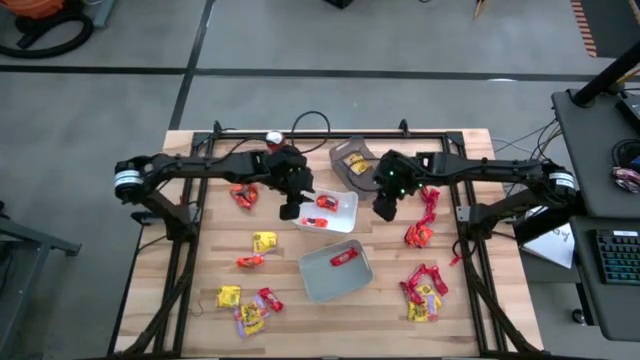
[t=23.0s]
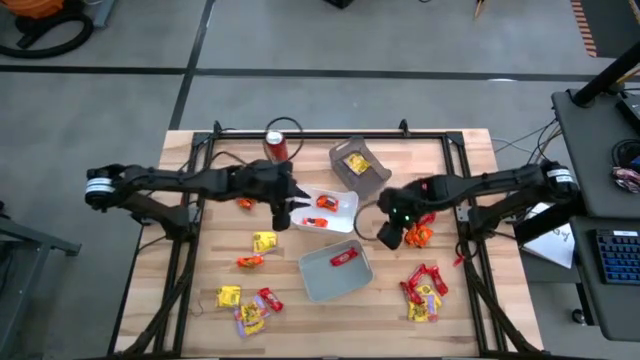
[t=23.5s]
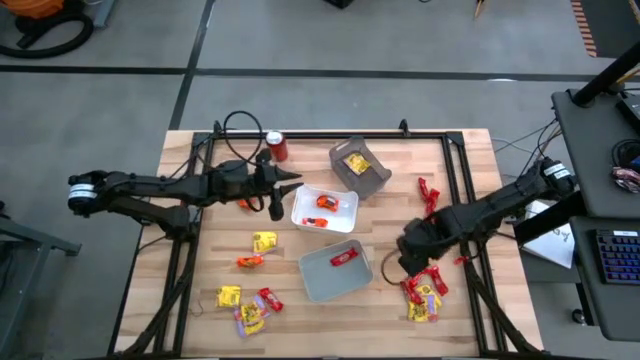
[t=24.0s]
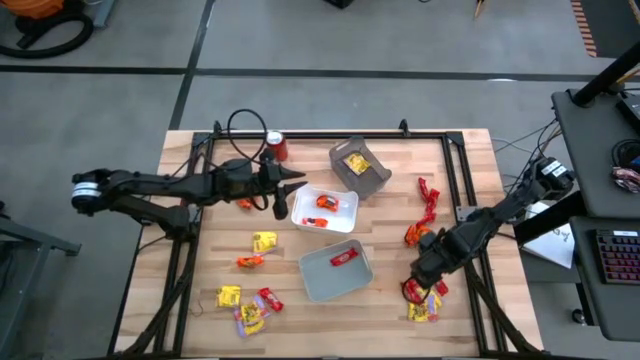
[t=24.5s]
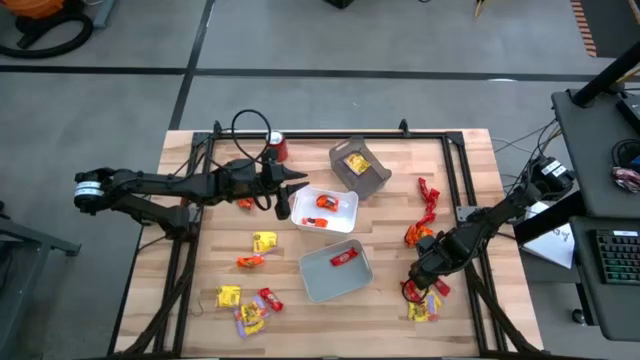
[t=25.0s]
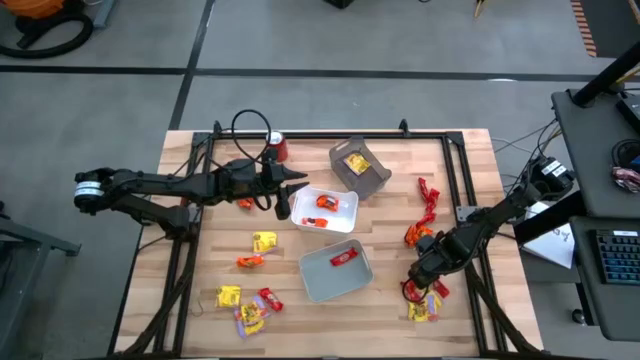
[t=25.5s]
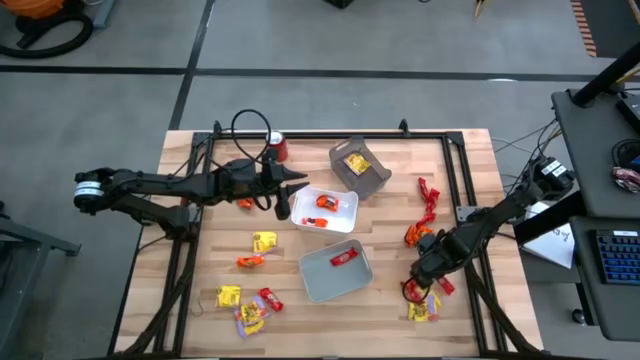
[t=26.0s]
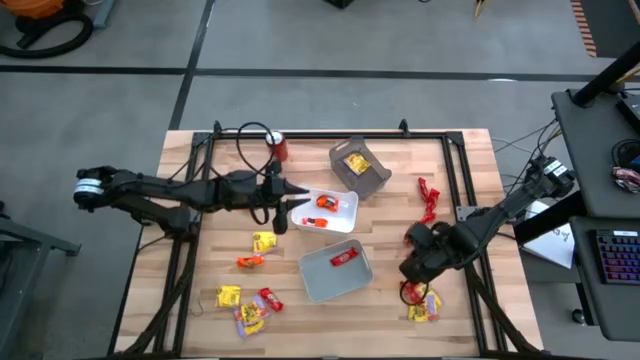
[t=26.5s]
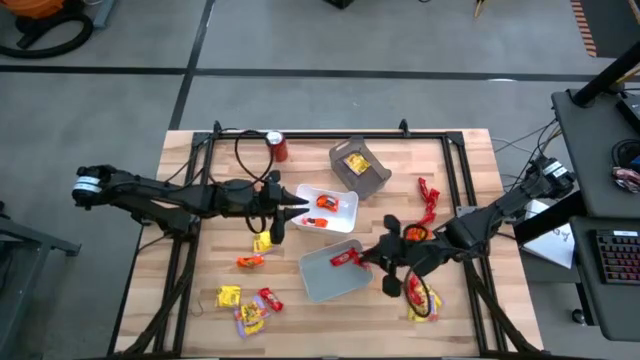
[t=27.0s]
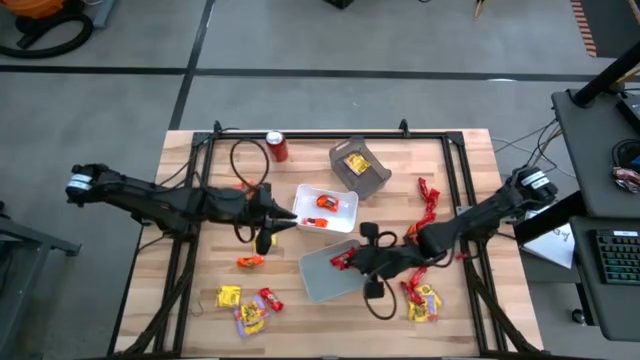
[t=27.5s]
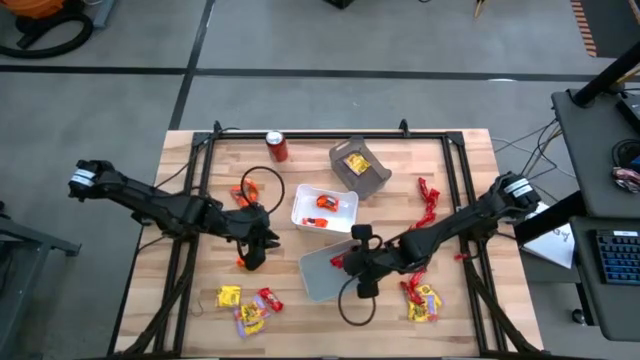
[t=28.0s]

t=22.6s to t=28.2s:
Task: Sort candy
Put the red chocolate pack into the gray bin

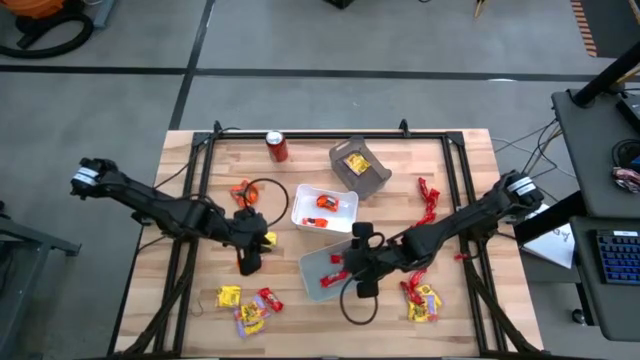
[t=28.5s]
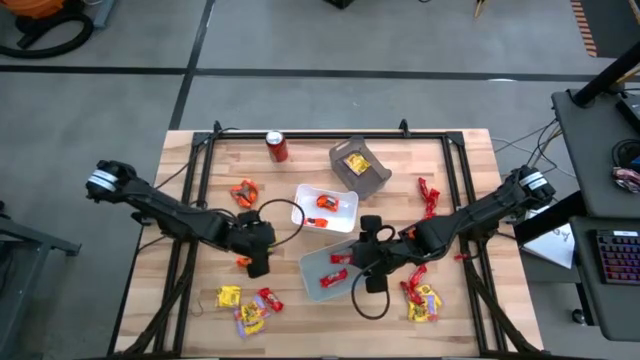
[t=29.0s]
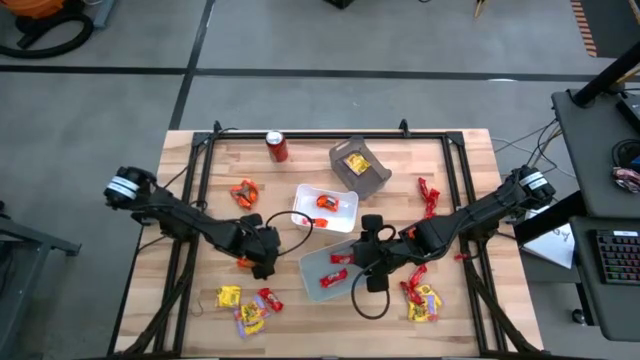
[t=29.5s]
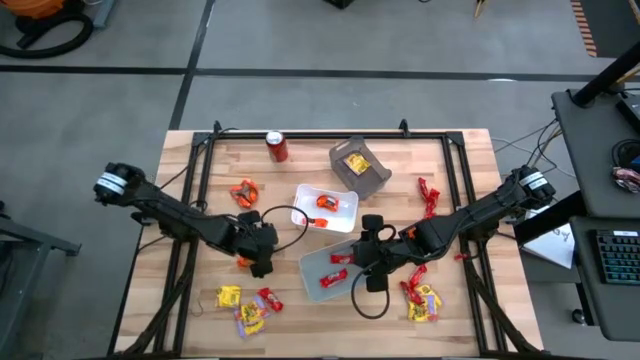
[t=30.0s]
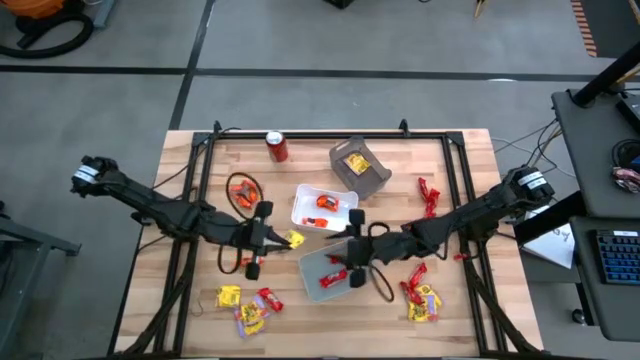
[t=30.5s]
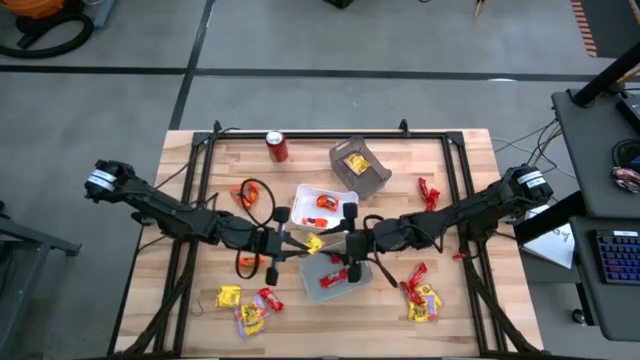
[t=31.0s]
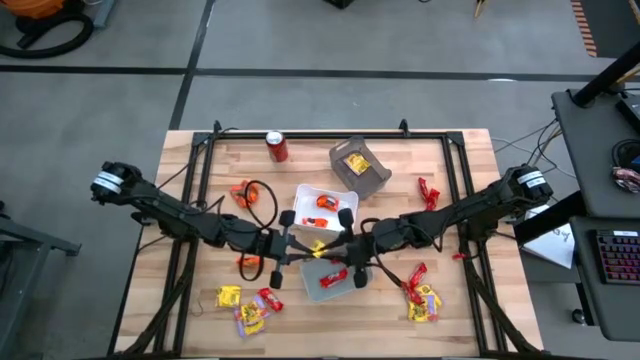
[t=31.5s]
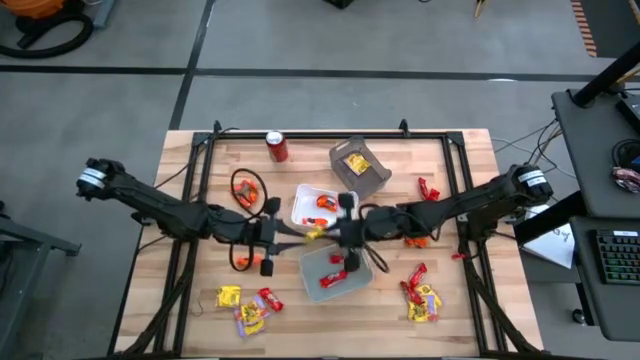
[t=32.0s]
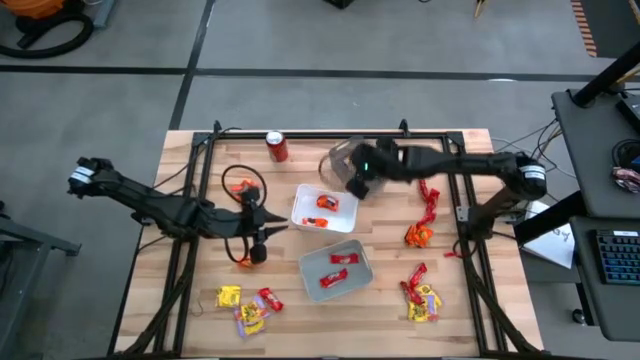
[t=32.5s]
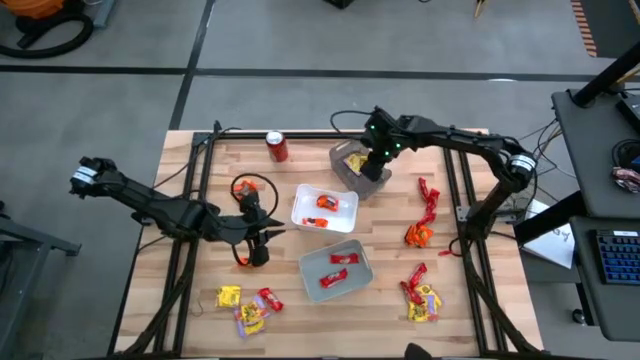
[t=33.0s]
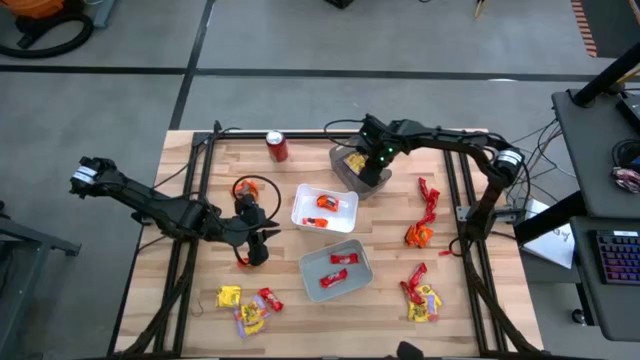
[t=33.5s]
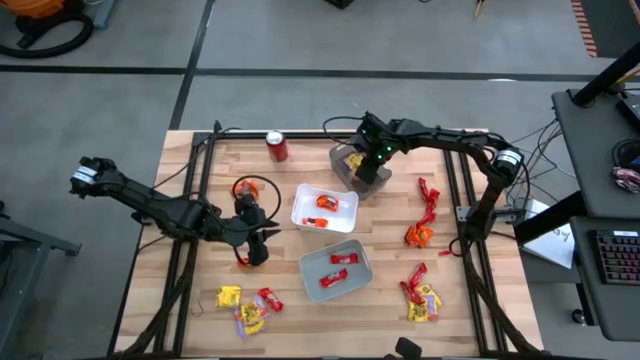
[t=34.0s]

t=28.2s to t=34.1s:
Put the yellow candy pack into the black bin

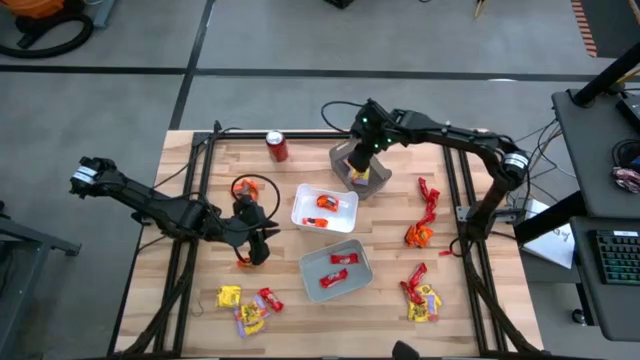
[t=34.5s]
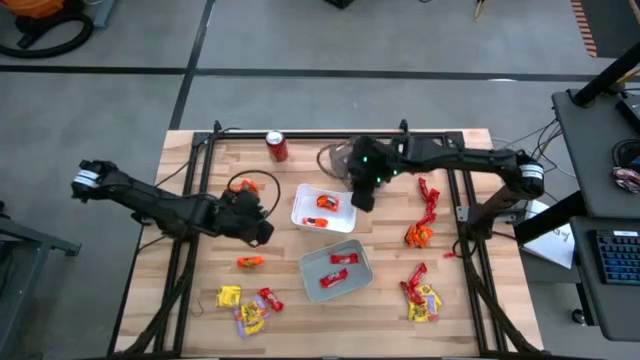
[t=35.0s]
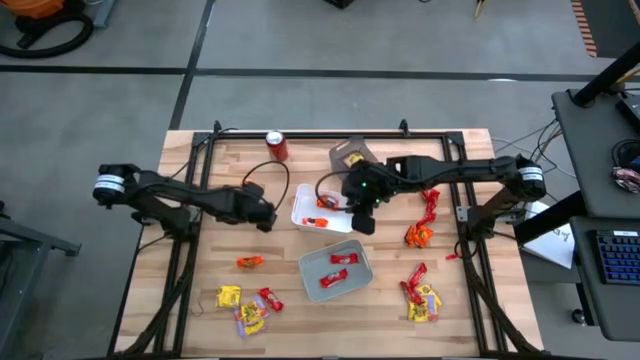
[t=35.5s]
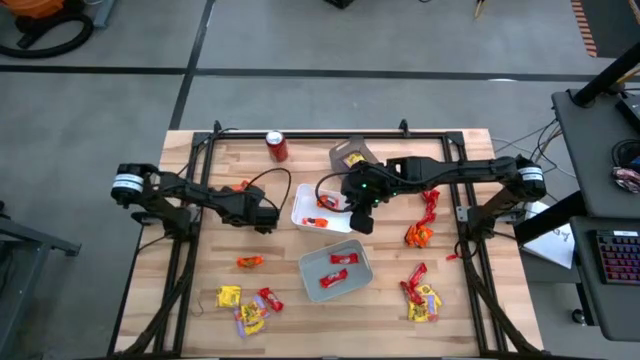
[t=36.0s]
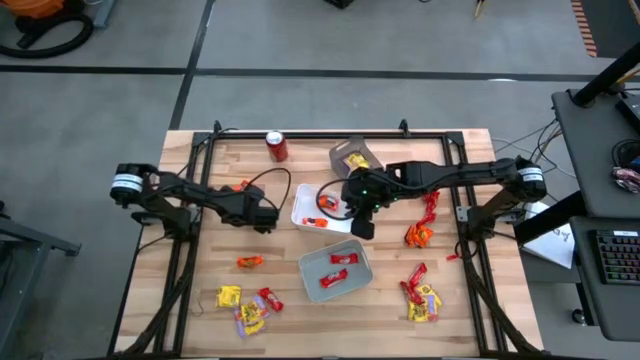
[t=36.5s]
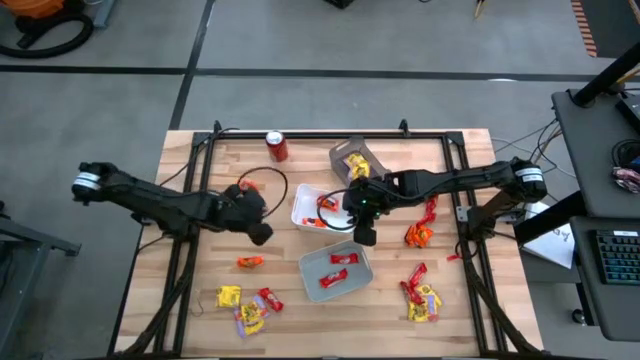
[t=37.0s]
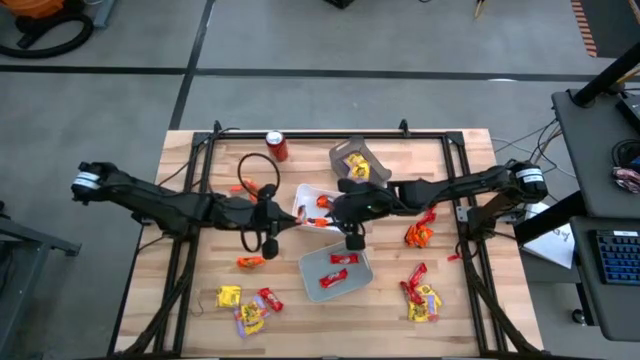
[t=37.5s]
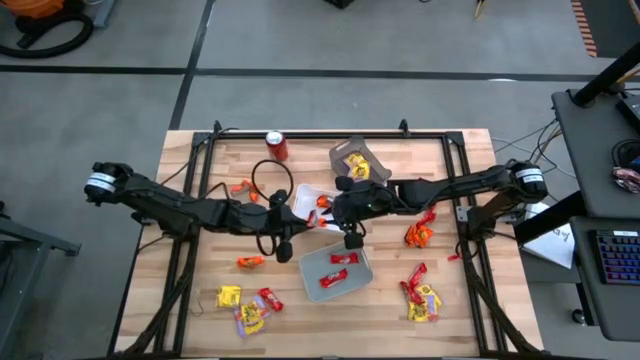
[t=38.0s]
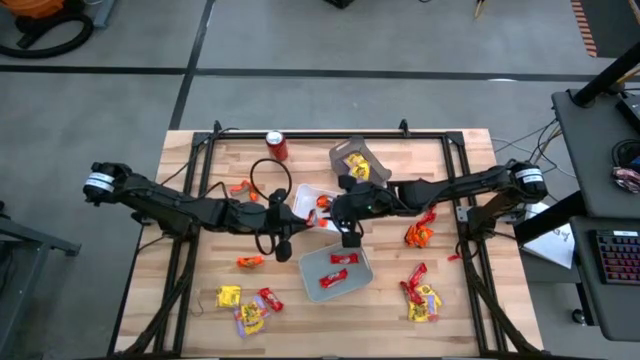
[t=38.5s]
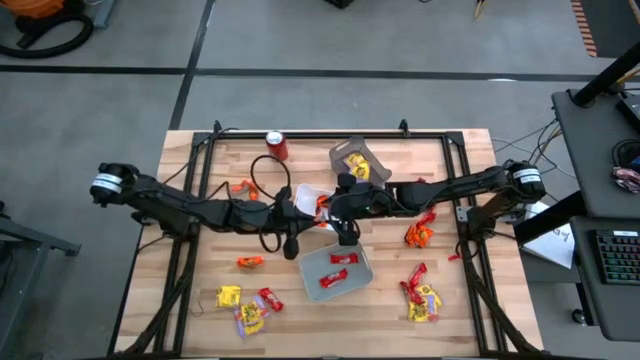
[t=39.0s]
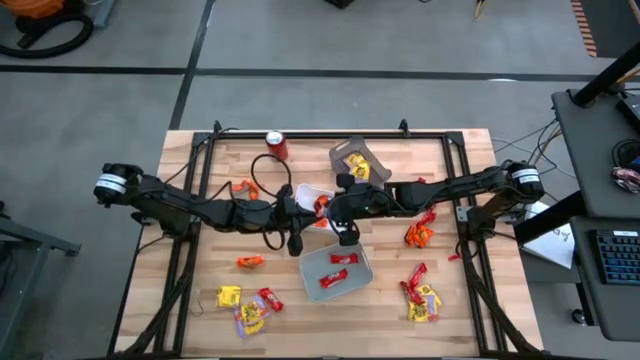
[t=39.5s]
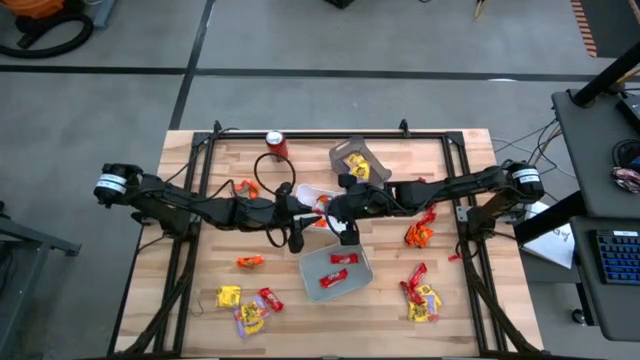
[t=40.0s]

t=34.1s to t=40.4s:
Put the orange chocolate pack into the white bin

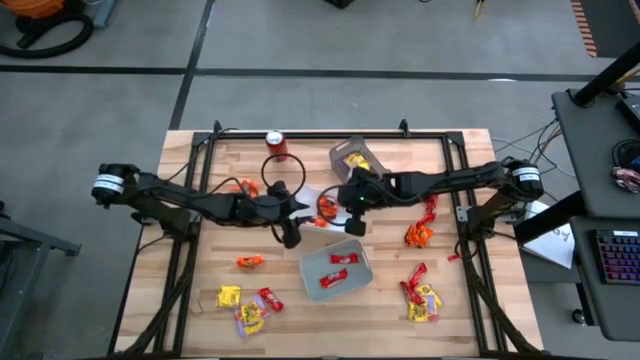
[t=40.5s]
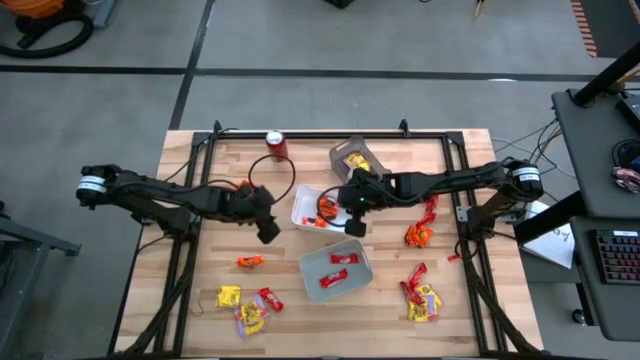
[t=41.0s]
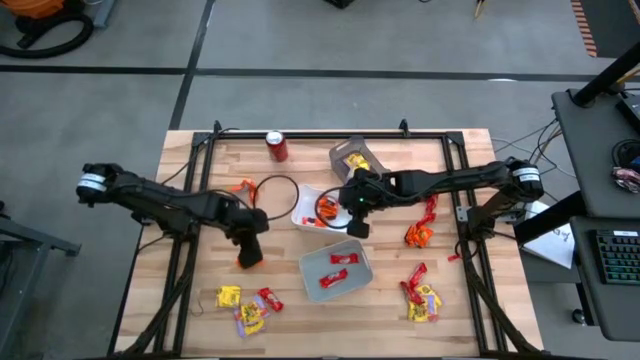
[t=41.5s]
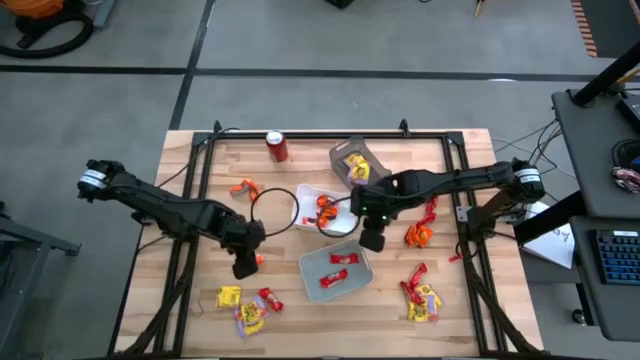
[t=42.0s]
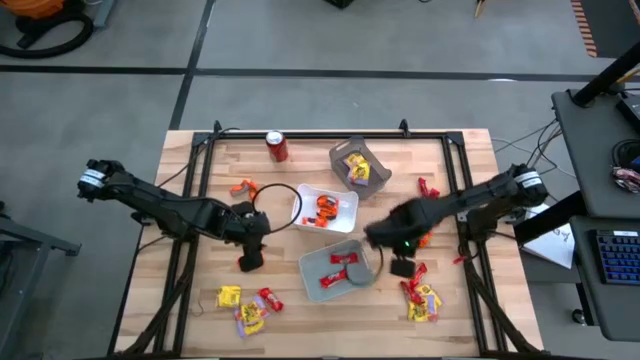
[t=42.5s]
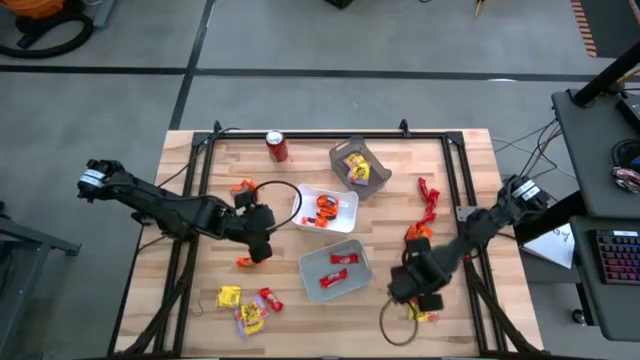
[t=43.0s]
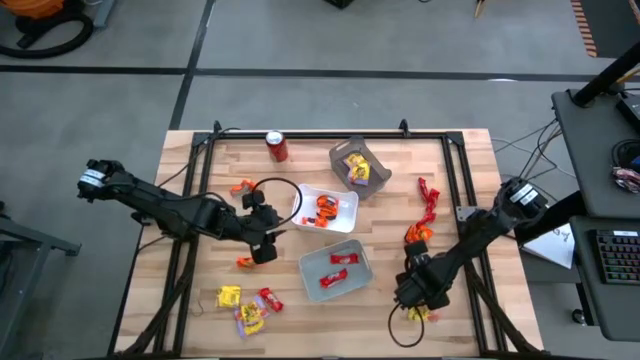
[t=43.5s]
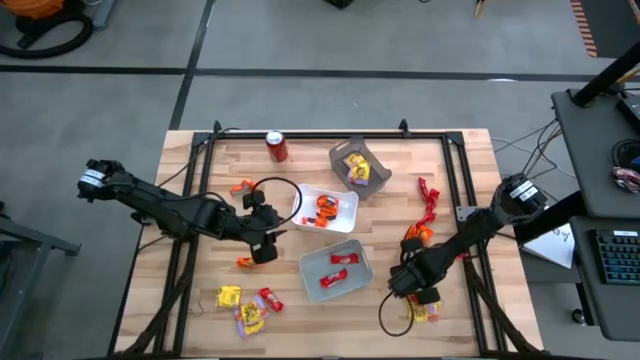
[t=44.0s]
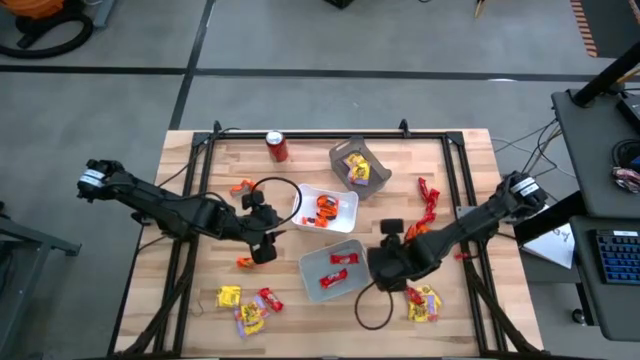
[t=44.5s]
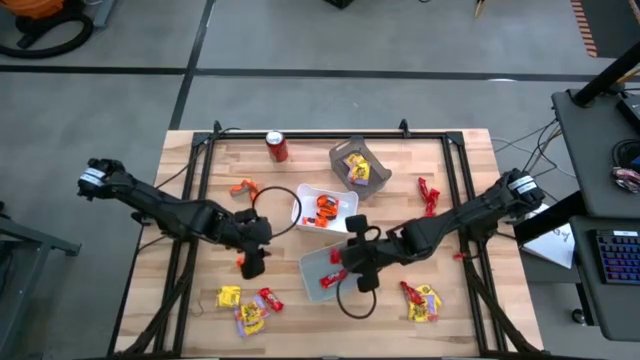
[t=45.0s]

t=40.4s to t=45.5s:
Put the red chocolate pack into the gray bin
